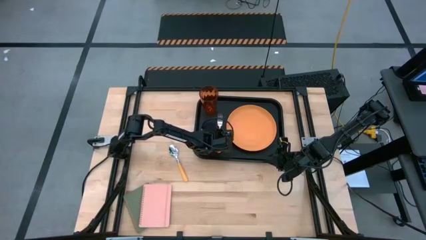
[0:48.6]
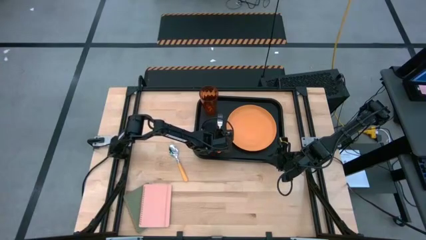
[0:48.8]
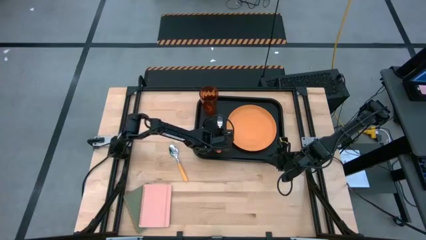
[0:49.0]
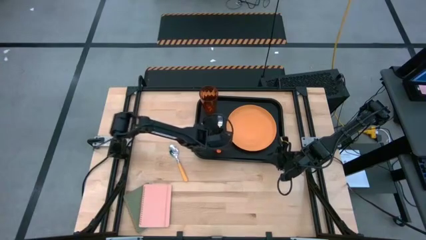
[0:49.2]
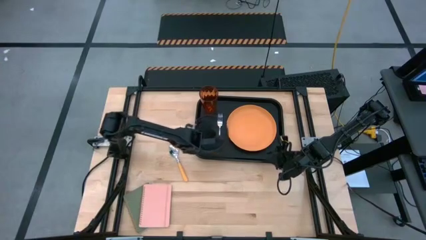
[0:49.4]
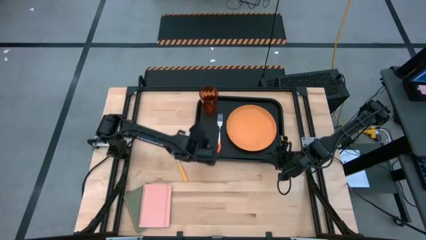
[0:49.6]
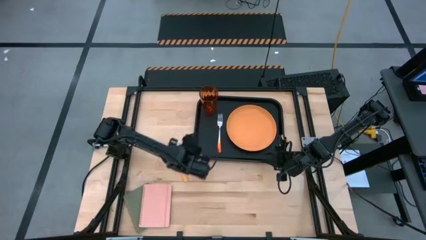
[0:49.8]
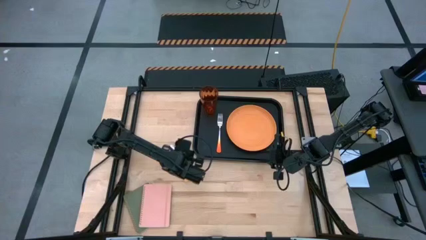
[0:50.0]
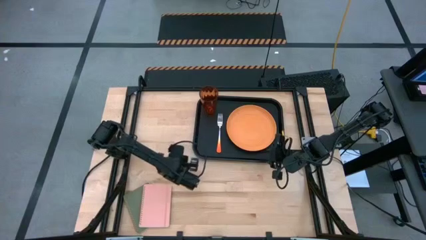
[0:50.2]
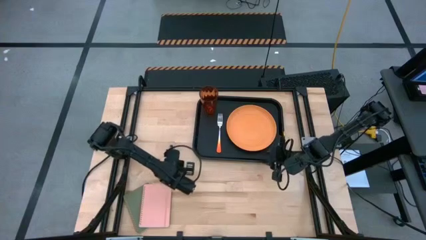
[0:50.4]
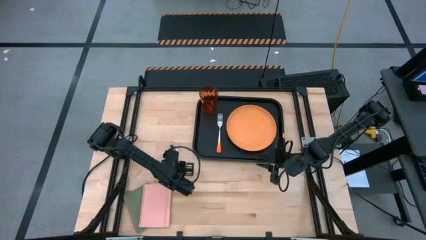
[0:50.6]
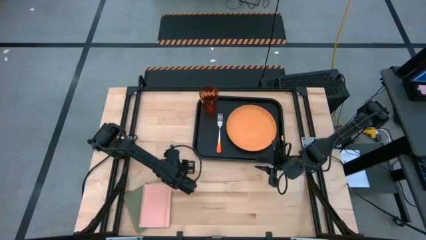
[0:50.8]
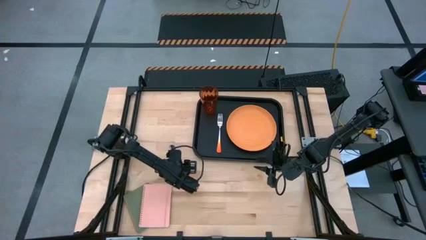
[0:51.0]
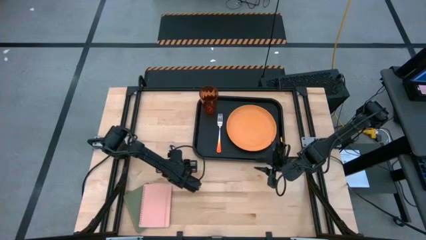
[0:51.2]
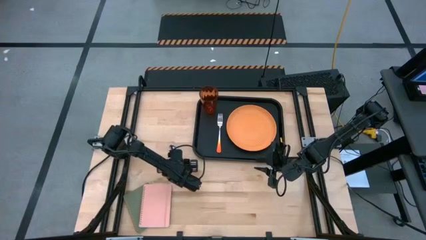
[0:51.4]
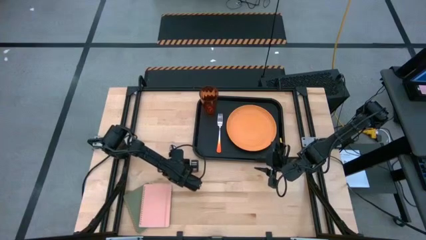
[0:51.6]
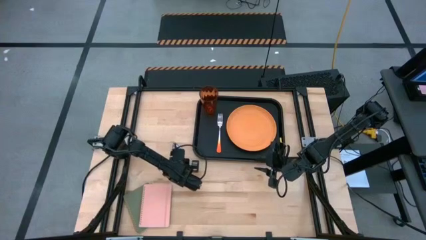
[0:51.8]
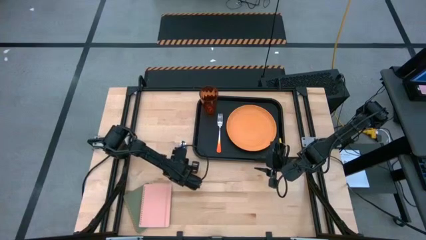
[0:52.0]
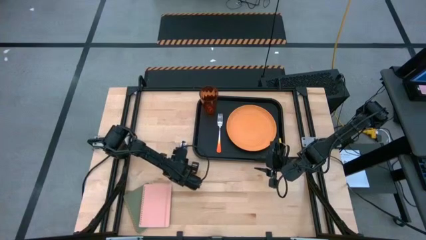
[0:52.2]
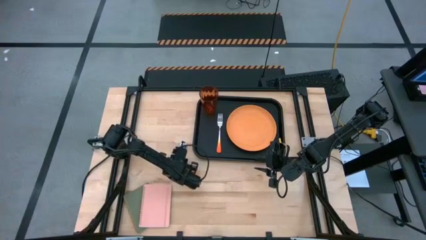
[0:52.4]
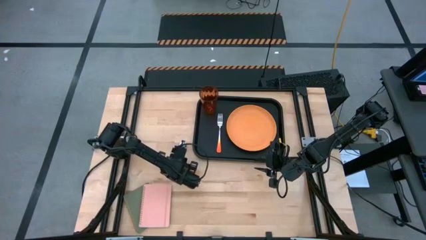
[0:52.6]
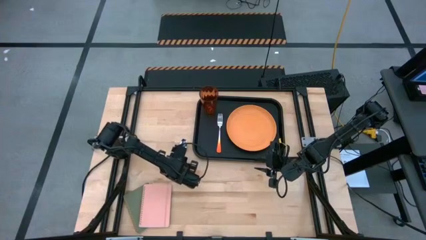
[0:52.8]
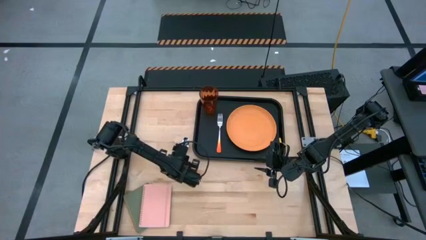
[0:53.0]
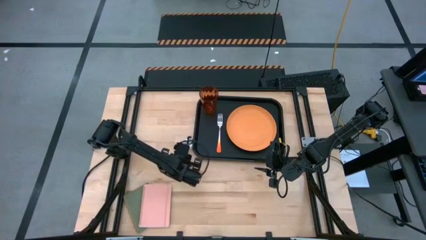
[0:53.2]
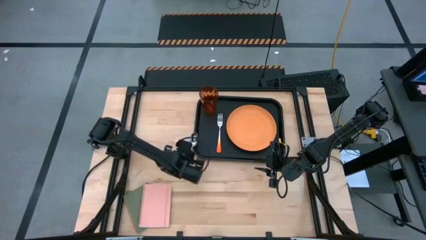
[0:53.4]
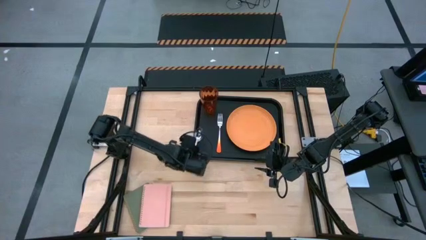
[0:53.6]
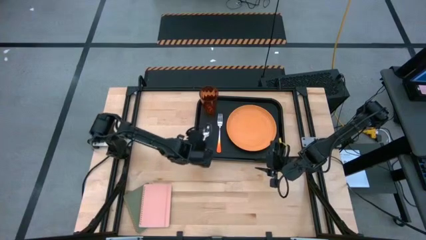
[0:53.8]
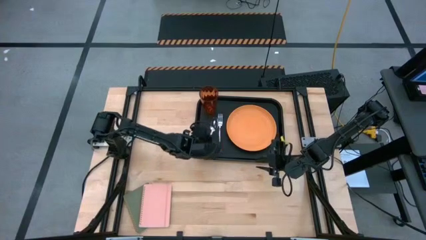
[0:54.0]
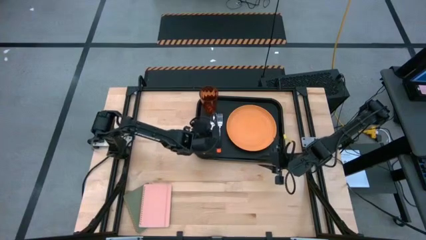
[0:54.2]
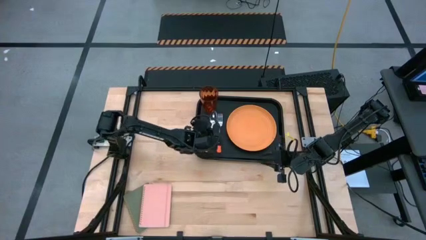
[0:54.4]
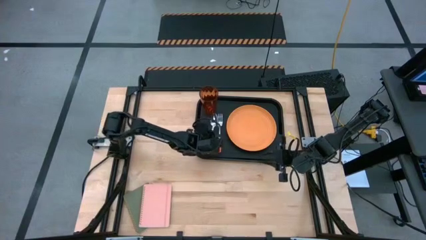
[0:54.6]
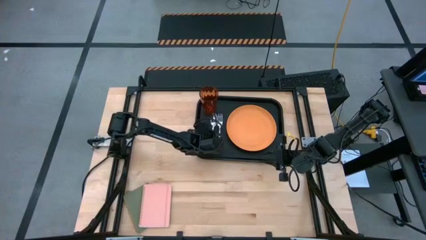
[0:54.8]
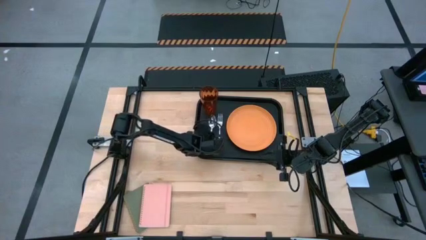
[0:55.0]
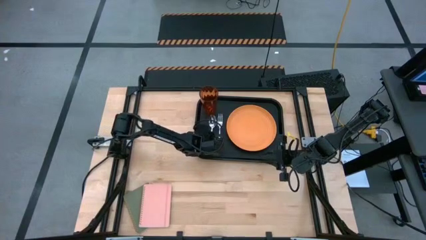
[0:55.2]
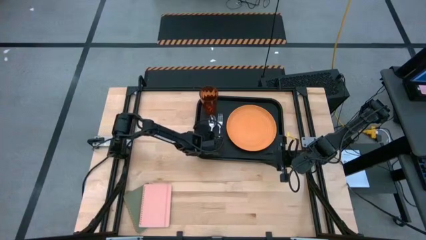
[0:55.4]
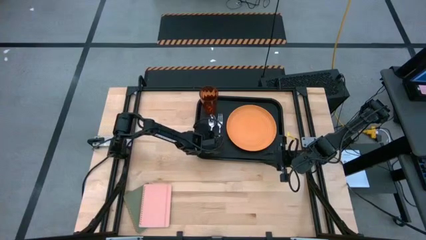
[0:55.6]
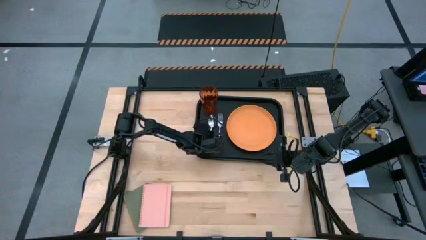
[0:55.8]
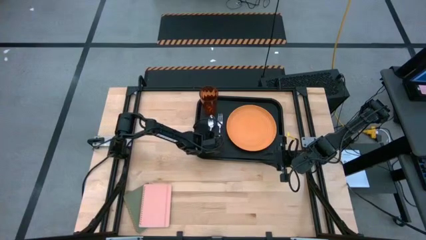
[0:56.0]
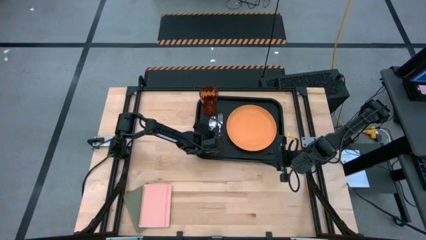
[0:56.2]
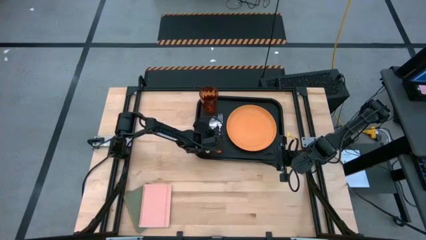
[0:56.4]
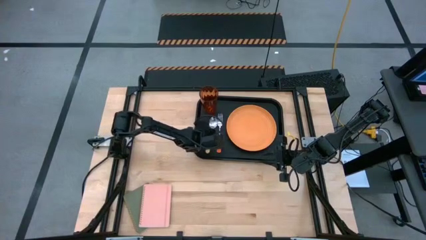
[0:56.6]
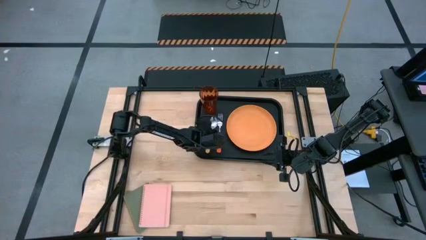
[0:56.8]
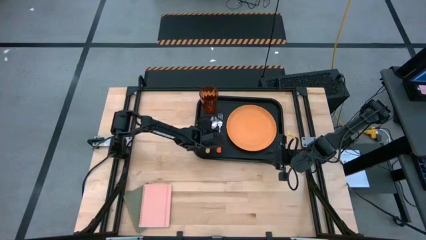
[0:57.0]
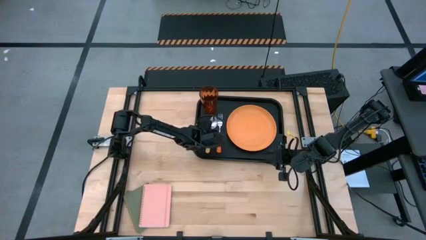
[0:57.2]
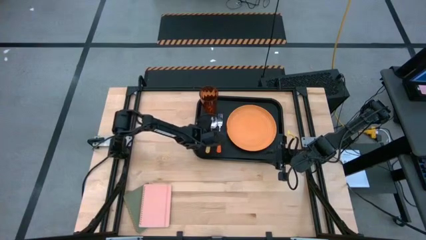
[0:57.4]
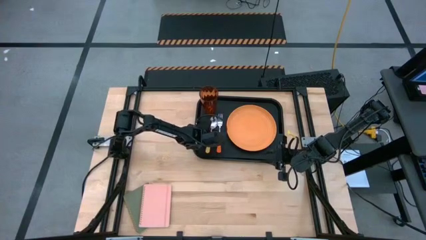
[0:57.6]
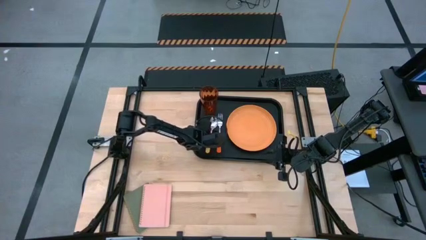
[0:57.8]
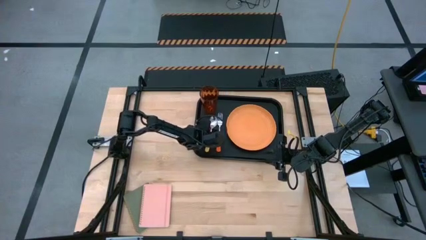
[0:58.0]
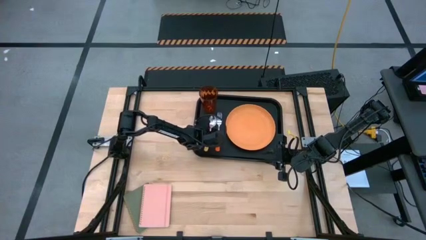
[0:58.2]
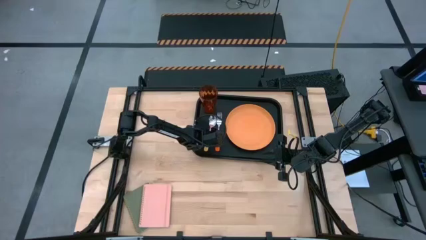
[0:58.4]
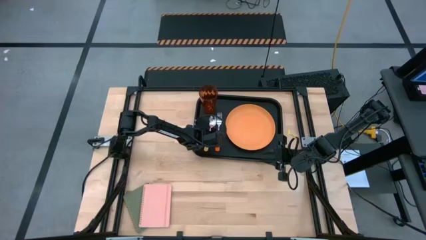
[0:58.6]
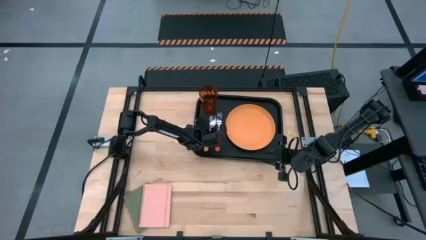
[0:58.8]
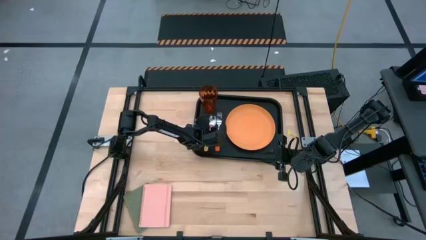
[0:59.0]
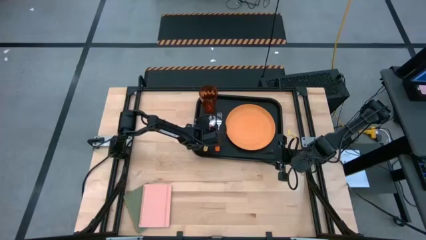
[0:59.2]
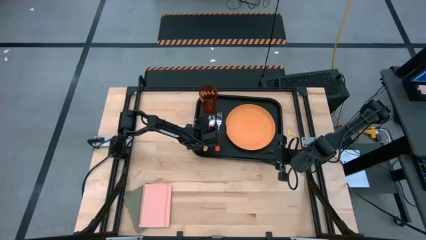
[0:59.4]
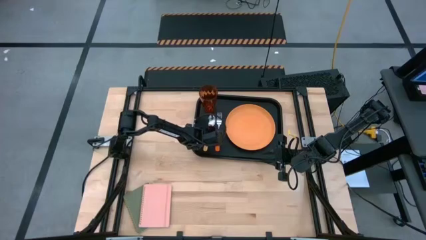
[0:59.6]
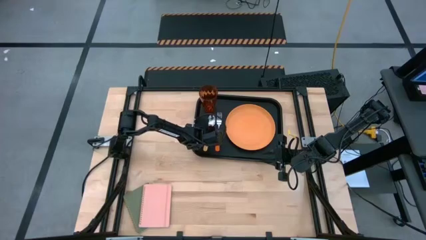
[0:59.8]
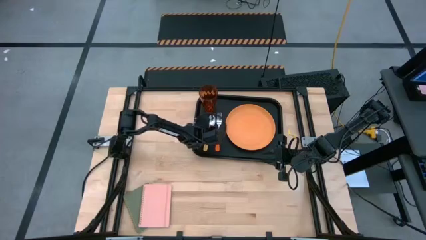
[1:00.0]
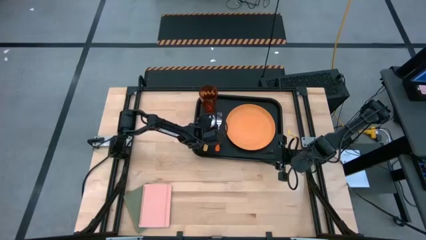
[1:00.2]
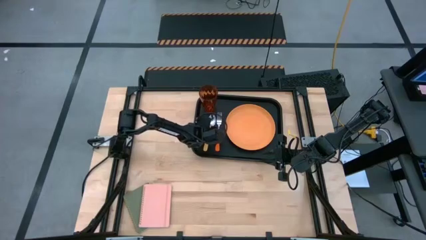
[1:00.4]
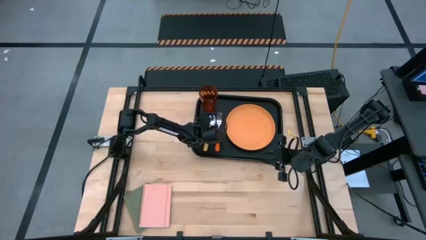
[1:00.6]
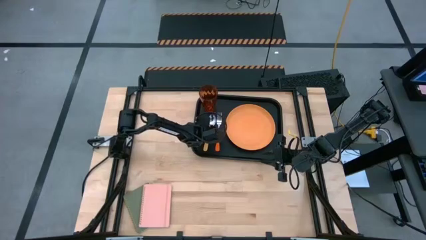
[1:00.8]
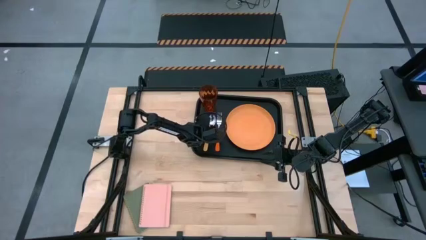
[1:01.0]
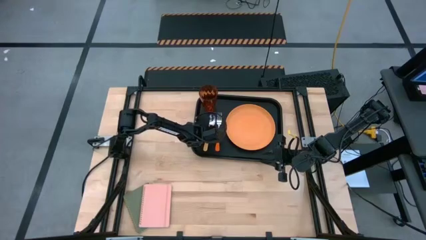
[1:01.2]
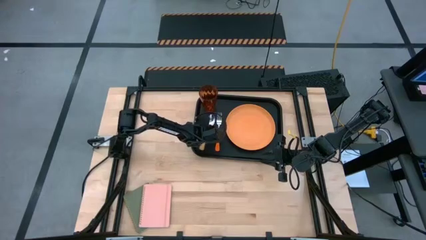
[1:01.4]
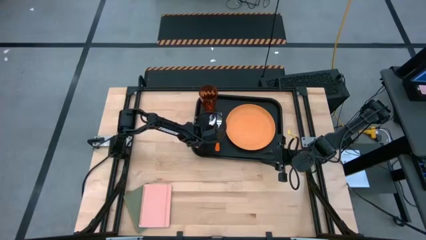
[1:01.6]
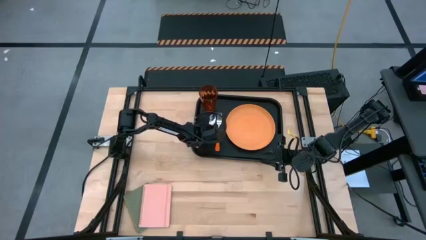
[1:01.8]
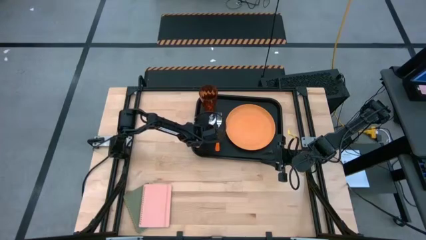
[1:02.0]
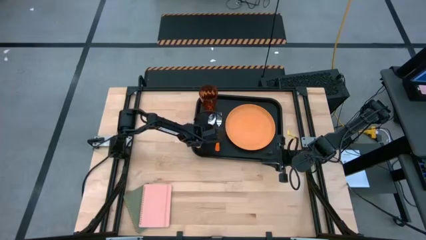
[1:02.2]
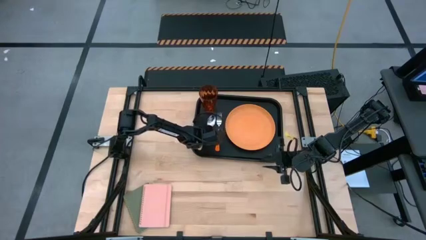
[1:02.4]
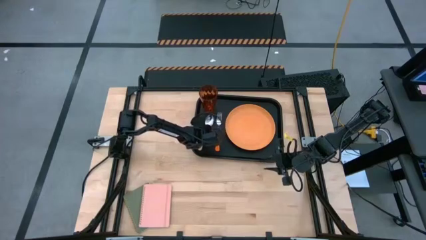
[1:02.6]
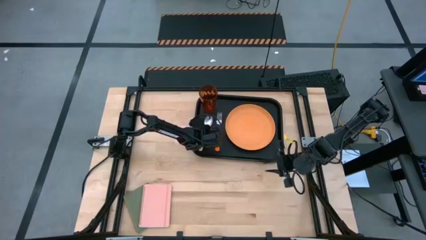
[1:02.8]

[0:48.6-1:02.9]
Task: Pick and place plate/cup/fork/spoon on tray
Put the yellow spoon on the black serving tray to the left of the orange fork
